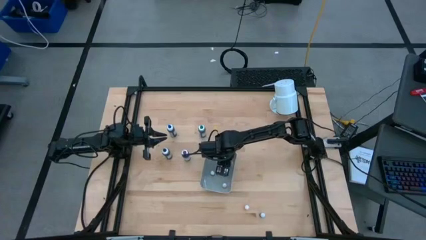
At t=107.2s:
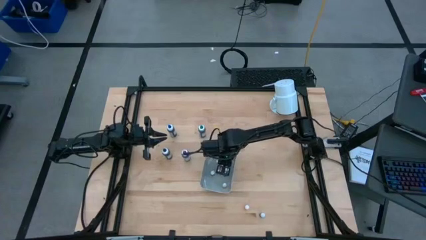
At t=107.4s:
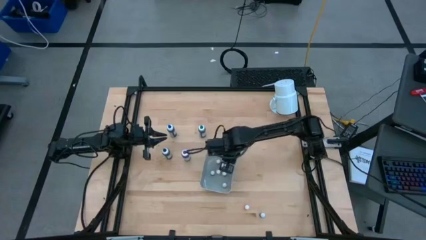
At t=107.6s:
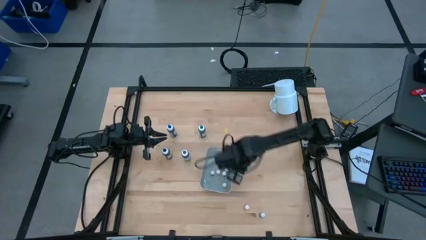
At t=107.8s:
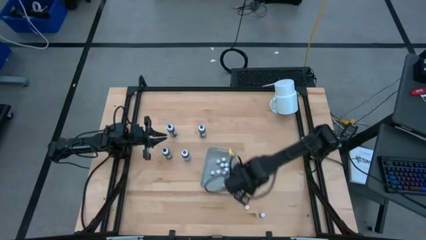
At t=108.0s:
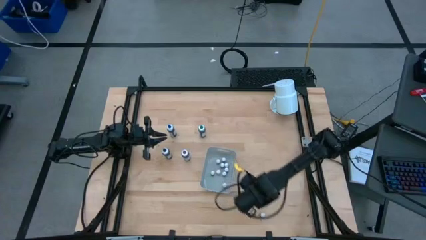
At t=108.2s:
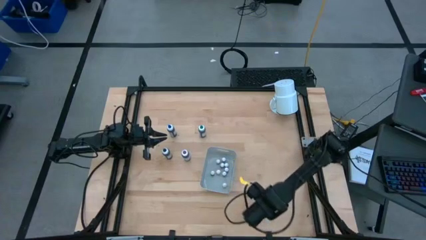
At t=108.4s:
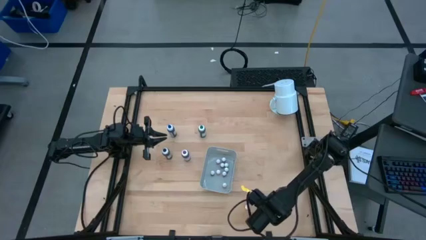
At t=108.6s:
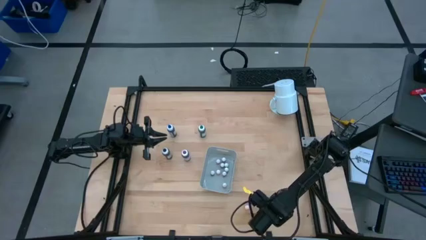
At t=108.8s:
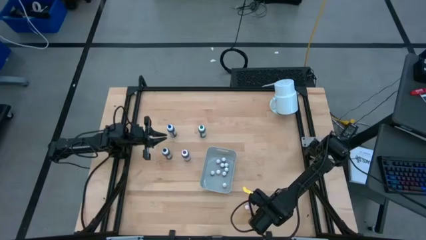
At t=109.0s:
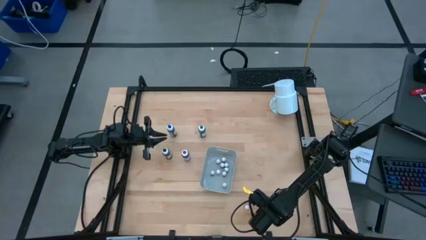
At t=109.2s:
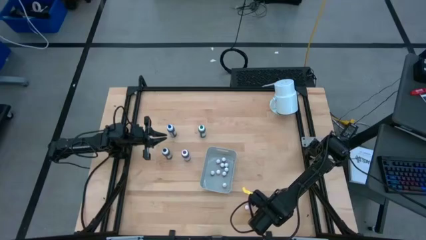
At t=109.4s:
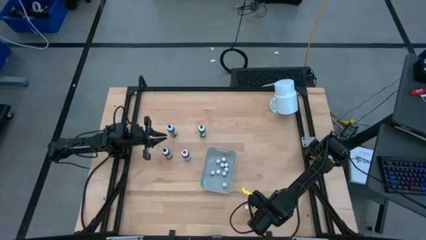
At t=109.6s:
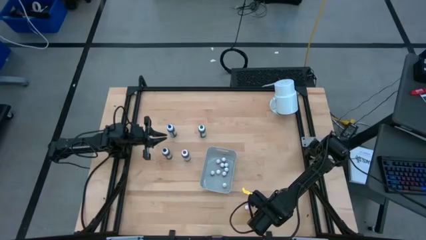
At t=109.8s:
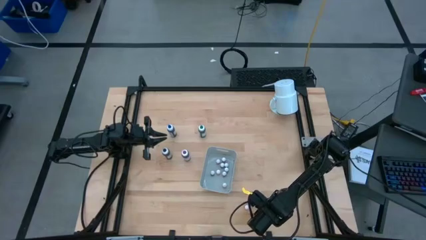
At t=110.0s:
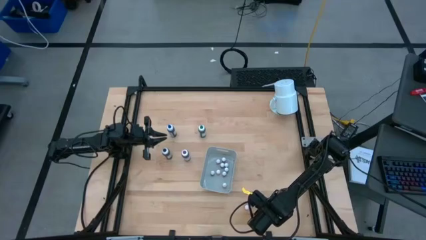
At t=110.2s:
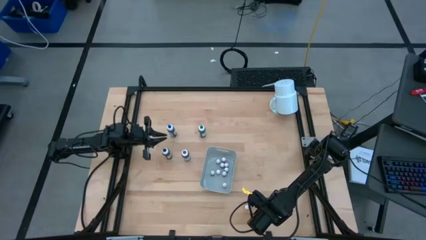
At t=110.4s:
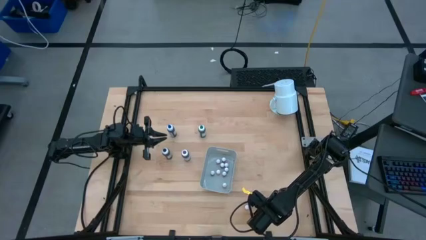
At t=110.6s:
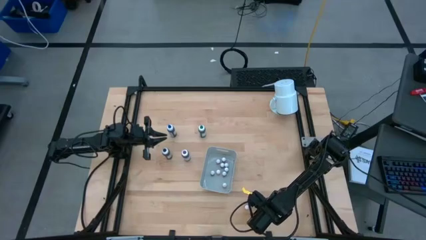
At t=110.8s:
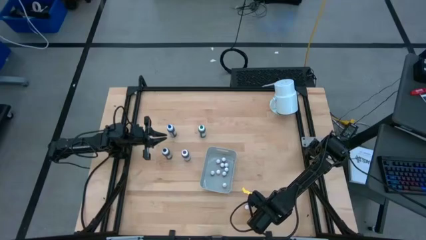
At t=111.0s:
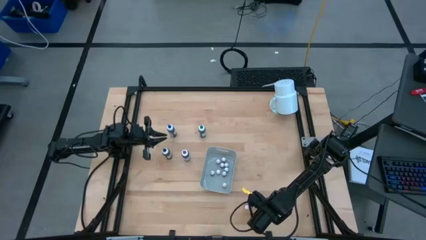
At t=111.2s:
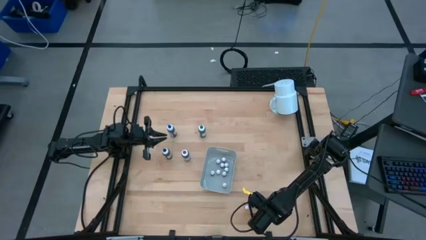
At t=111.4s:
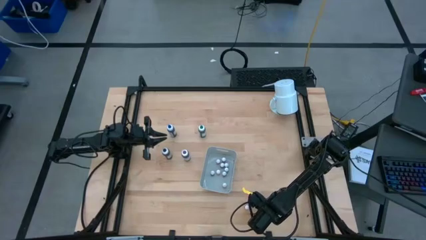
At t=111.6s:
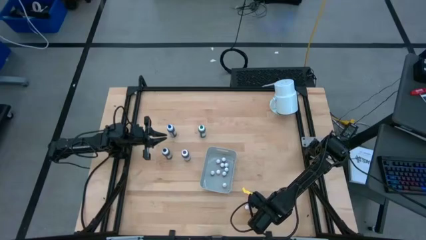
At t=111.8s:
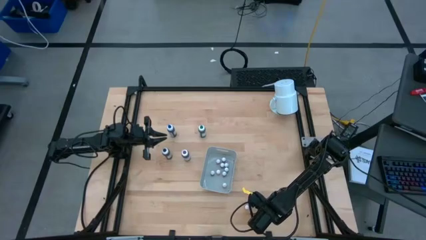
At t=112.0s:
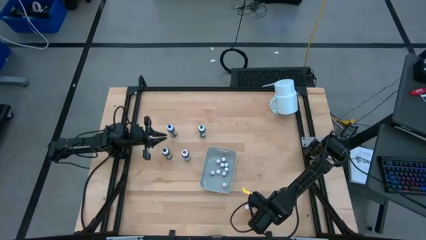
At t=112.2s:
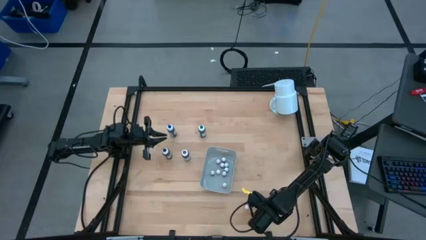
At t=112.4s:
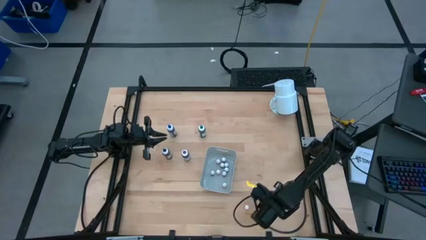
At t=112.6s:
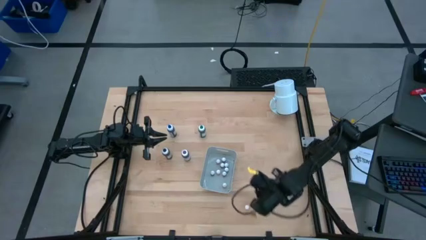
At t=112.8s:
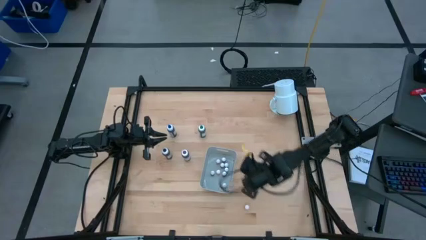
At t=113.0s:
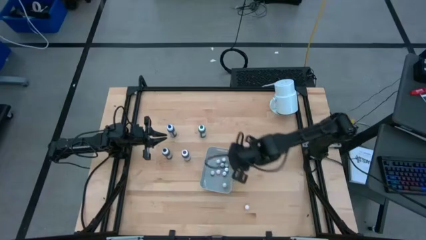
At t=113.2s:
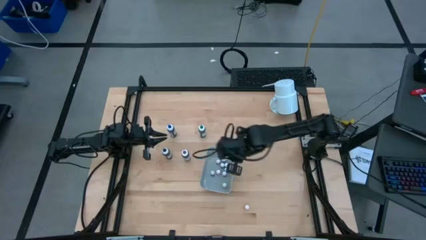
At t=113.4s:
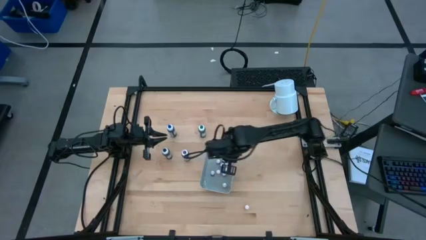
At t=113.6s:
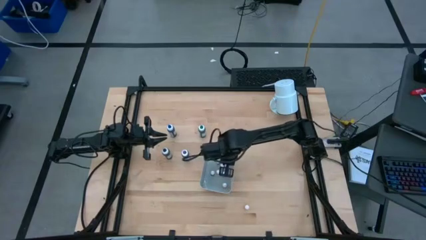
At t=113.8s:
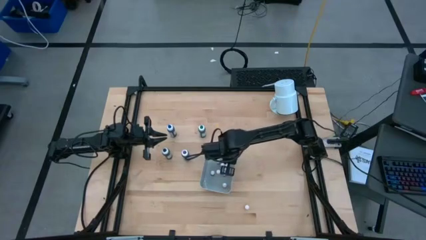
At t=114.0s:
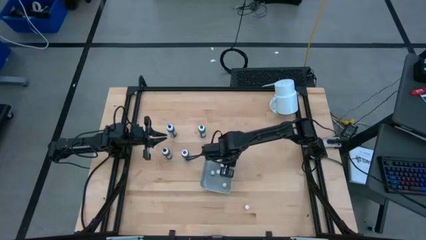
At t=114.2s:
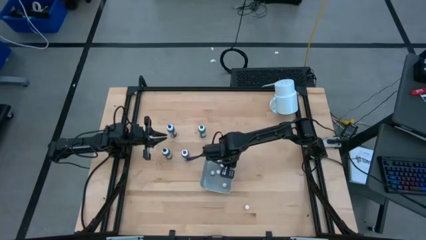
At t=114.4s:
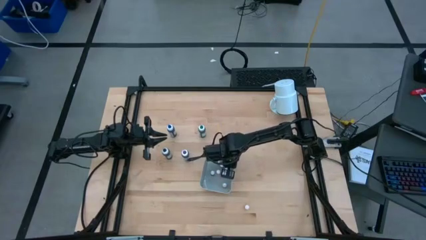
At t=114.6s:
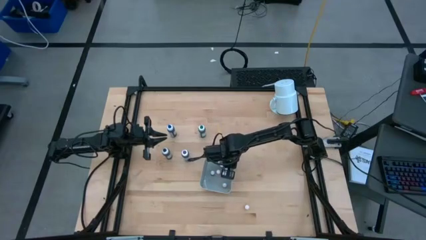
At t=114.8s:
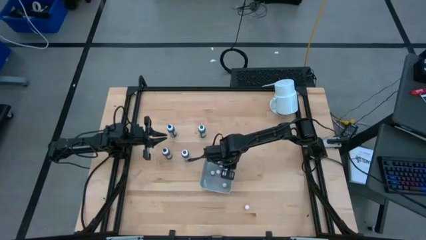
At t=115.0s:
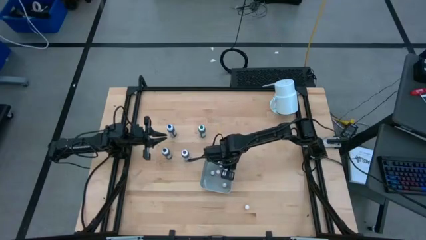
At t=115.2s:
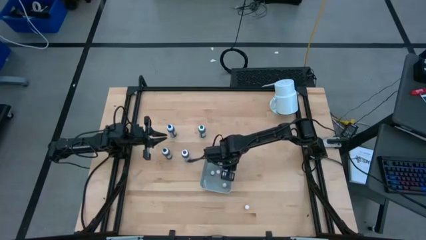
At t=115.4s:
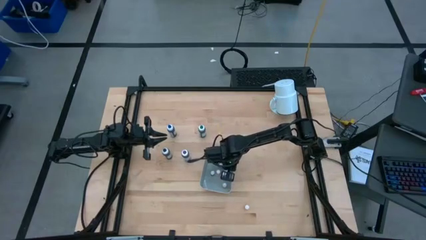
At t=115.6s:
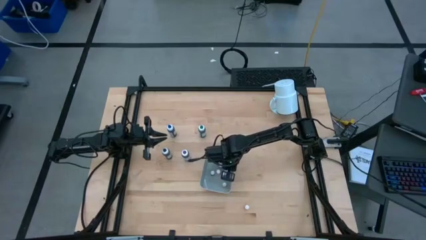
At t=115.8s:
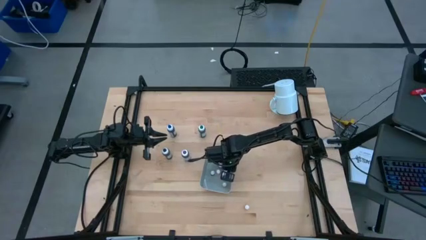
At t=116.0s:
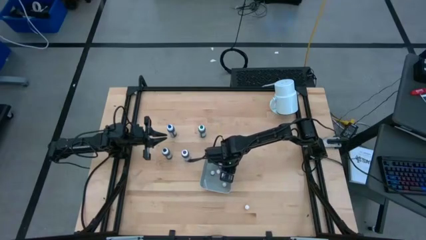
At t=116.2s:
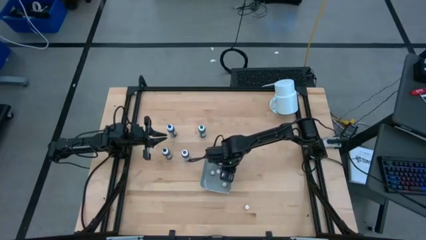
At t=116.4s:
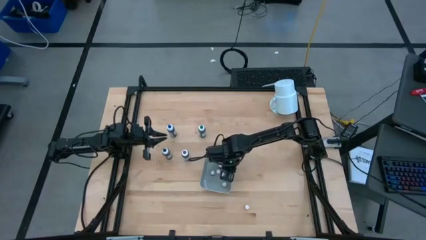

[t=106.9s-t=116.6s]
Task: Pick & Place food coloring
Put the small black food coloring bottle into the white bin

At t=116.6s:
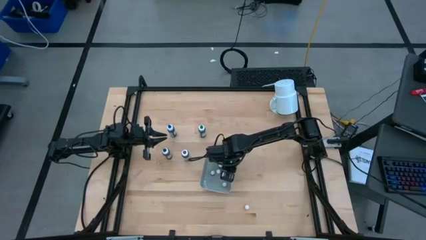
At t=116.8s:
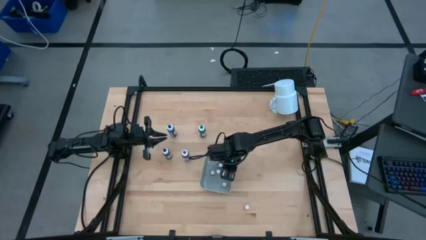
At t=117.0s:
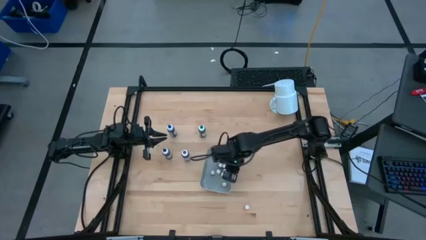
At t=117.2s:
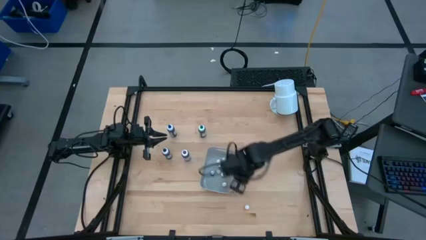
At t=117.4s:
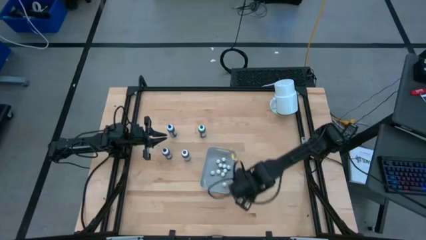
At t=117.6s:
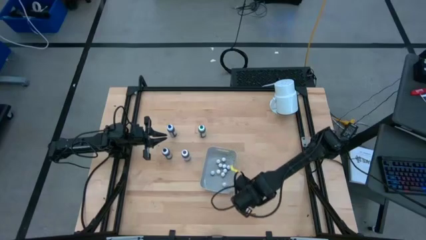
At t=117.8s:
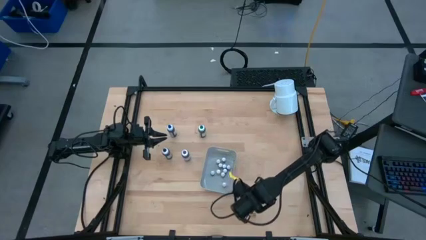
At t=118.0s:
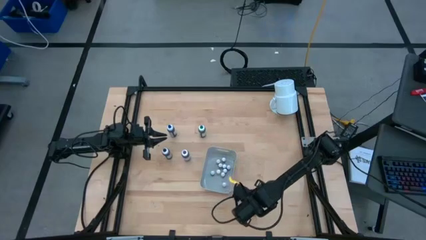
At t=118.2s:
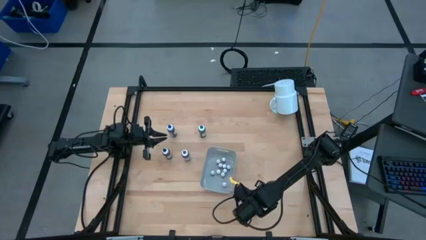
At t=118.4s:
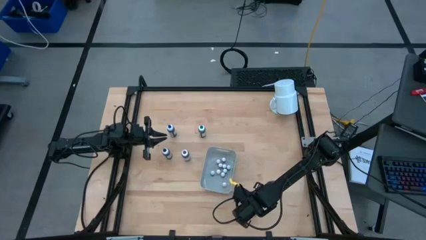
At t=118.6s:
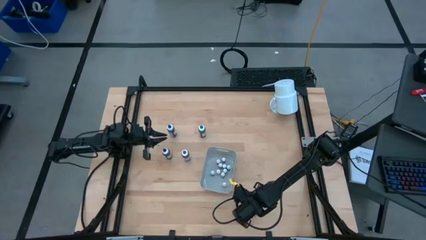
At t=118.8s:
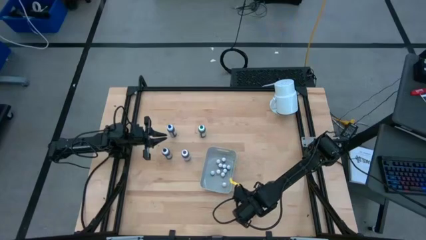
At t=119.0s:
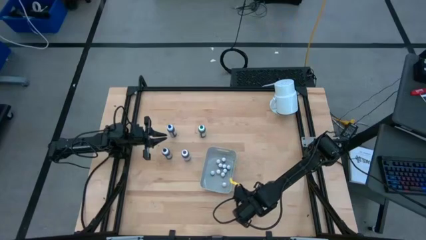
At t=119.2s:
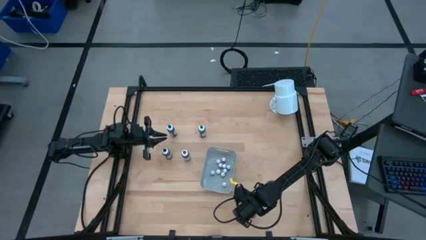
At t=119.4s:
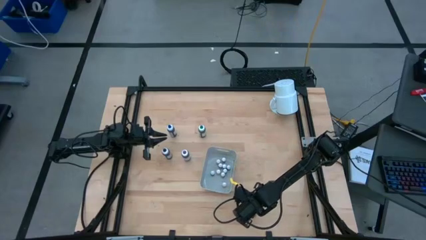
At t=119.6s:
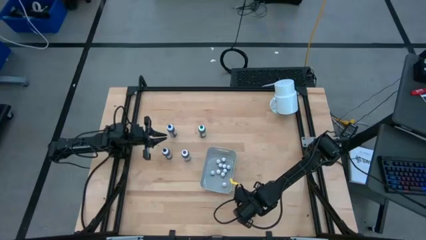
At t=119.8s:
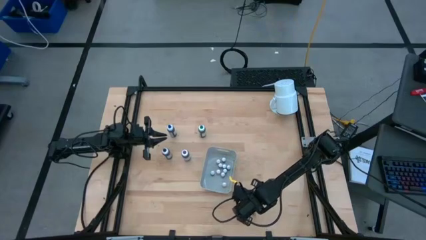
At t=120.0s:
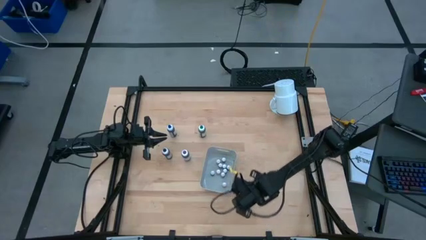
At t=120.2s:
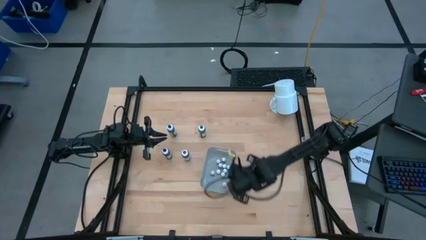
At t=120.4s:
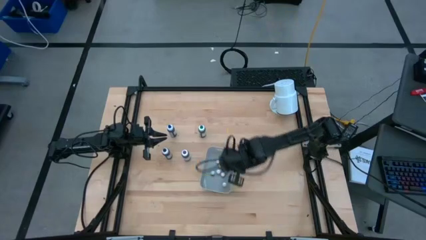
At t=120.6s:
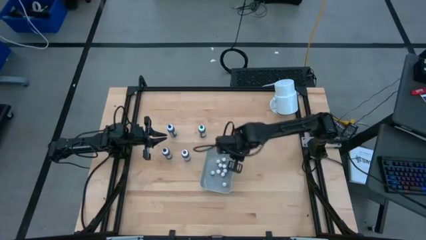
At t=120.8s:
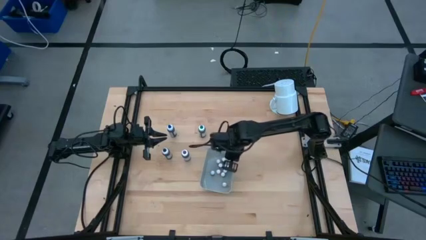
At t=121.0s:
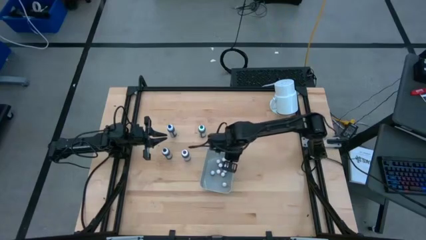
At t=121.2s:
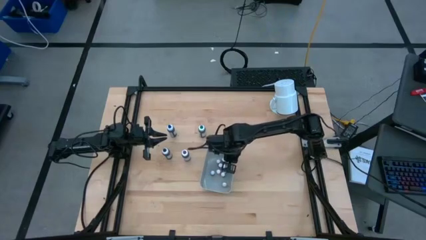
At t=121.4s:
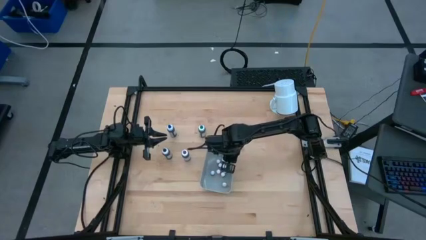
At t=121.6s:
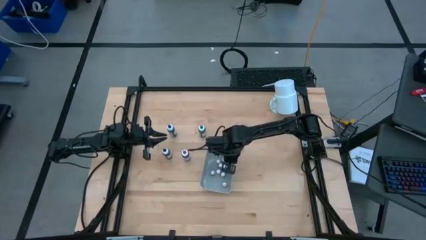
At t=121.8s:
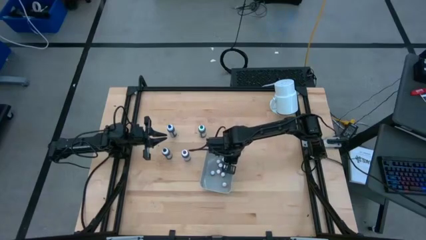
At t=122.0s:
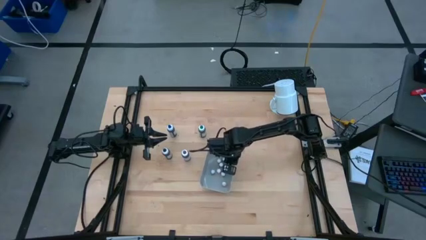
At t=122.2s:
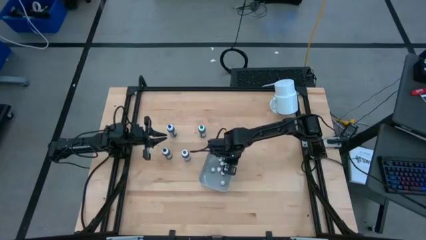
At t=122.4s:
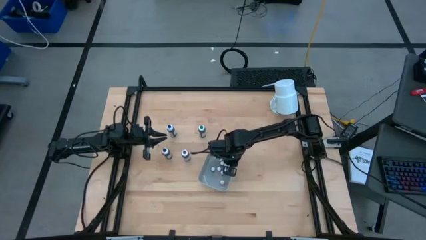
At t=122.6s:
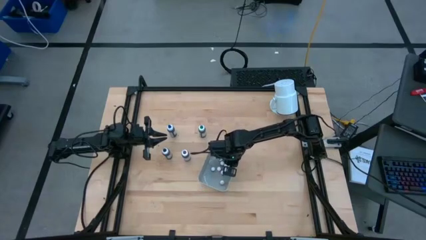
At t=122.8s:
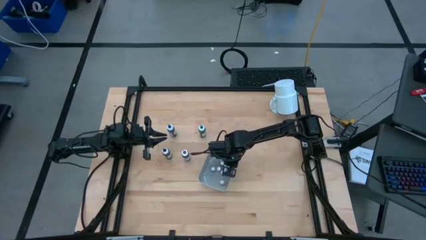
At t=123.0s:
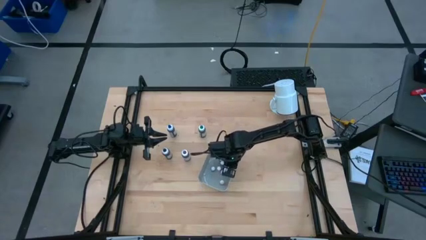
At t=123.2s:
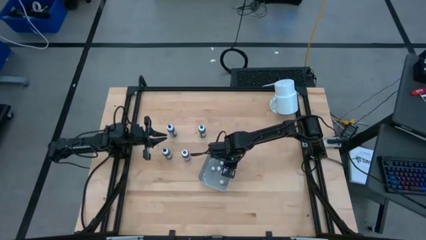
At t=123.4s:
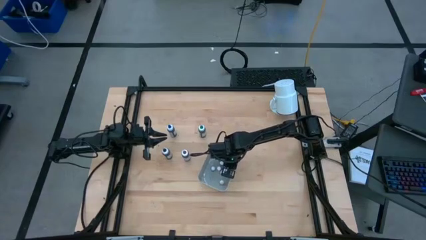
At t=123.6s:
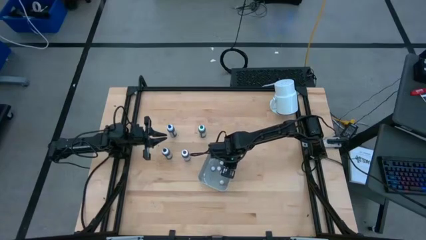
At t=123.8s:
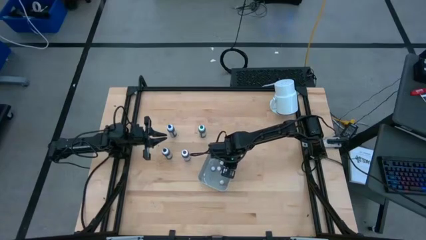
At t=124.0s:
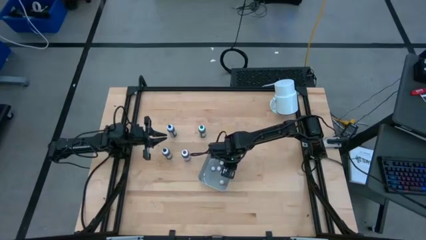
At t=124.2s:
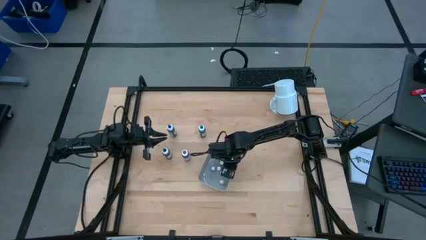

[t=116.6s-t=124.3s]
Put the small yellow food coloring bottle into the white bin
